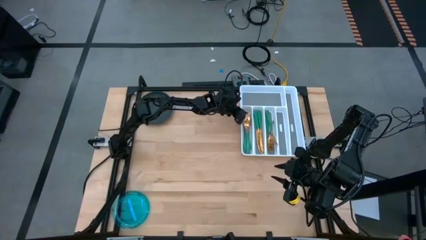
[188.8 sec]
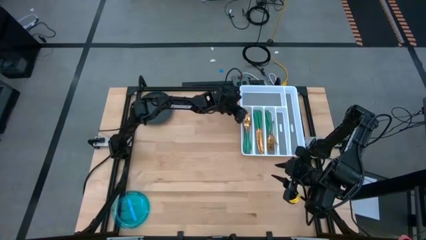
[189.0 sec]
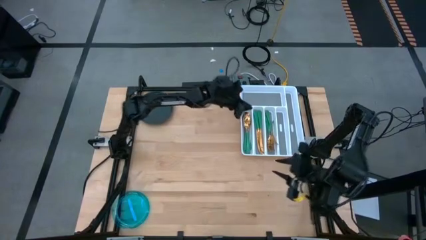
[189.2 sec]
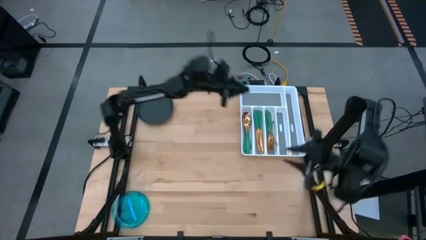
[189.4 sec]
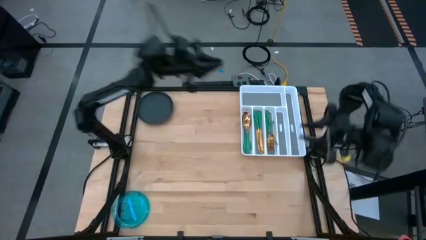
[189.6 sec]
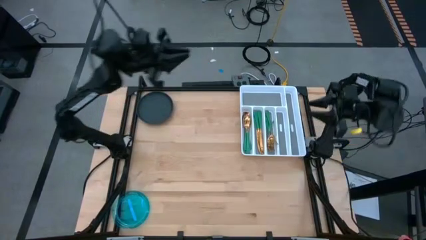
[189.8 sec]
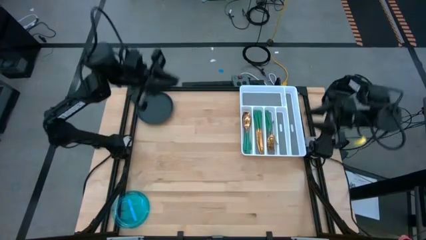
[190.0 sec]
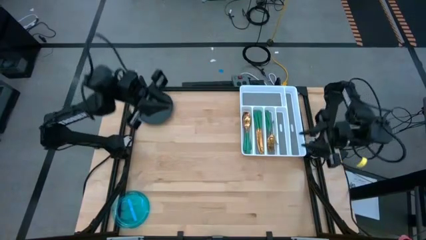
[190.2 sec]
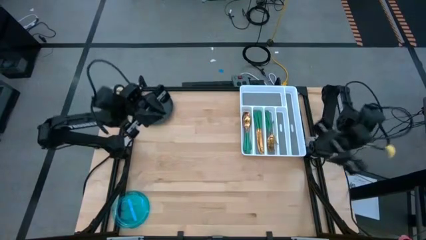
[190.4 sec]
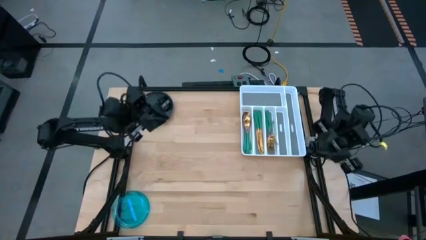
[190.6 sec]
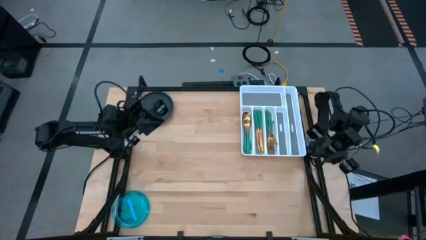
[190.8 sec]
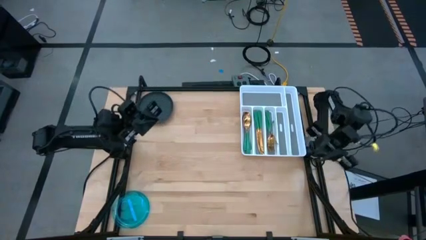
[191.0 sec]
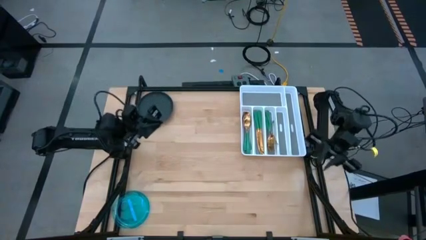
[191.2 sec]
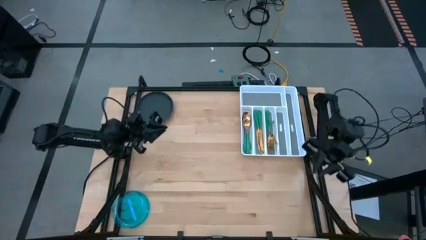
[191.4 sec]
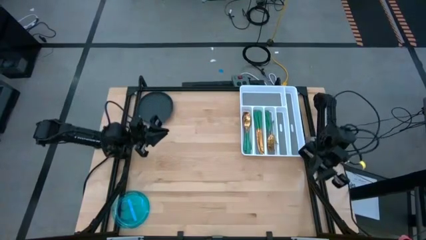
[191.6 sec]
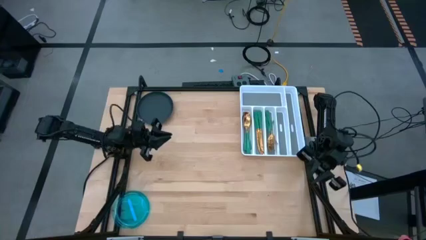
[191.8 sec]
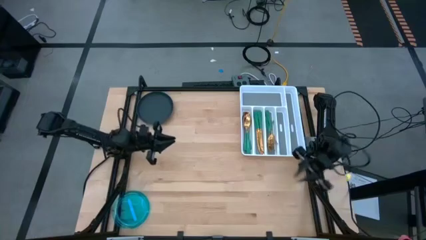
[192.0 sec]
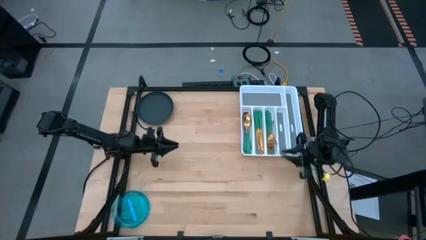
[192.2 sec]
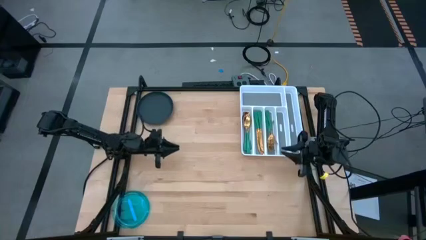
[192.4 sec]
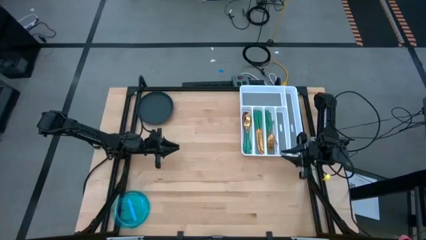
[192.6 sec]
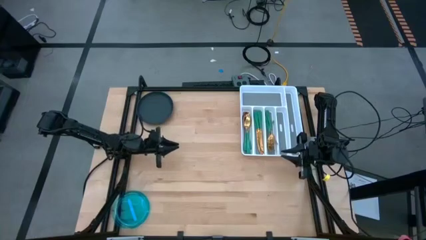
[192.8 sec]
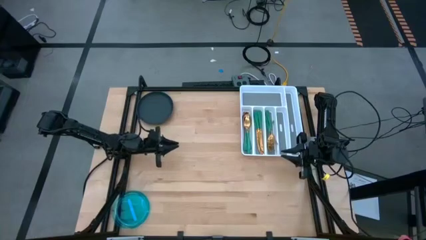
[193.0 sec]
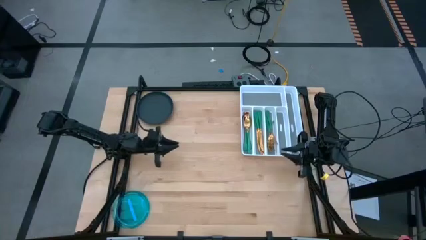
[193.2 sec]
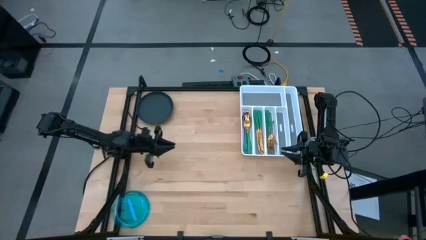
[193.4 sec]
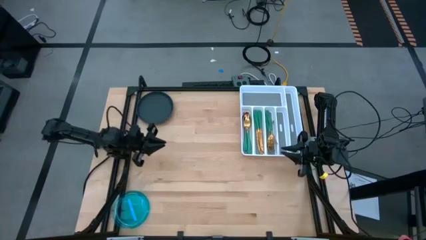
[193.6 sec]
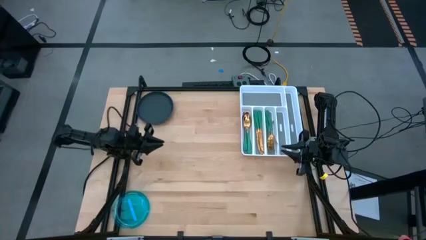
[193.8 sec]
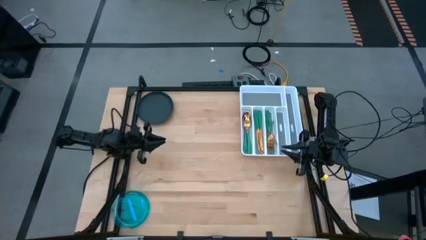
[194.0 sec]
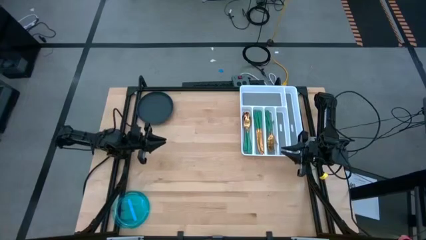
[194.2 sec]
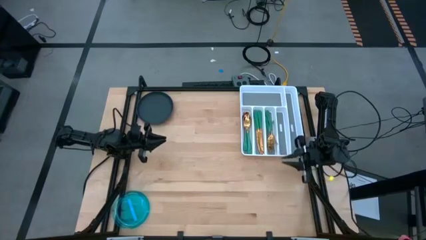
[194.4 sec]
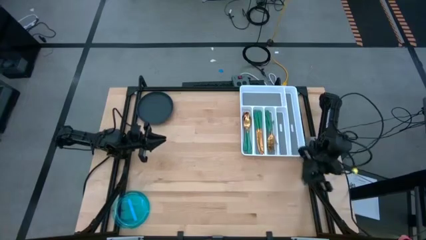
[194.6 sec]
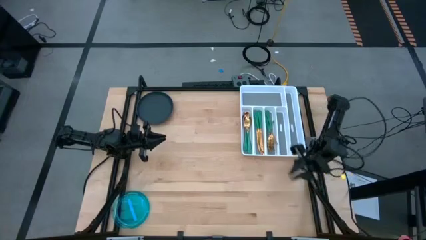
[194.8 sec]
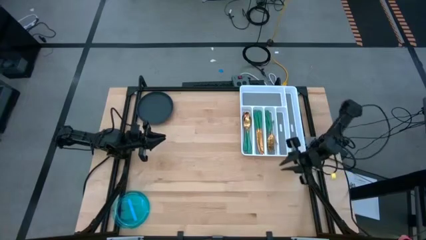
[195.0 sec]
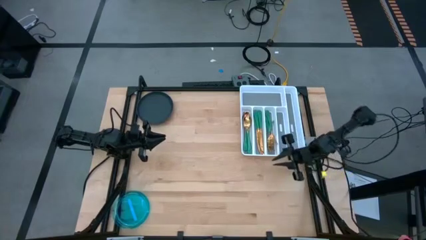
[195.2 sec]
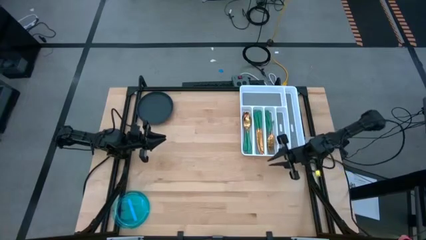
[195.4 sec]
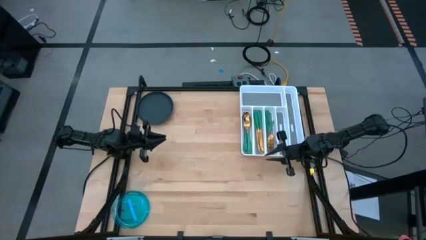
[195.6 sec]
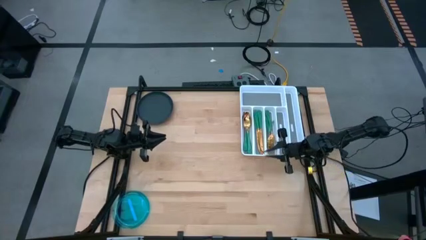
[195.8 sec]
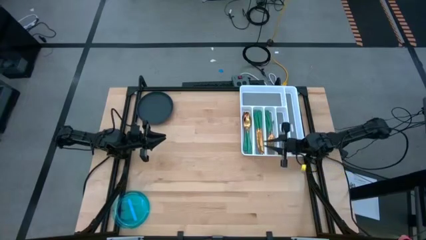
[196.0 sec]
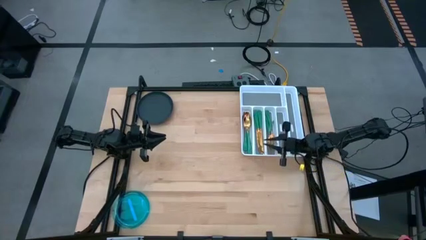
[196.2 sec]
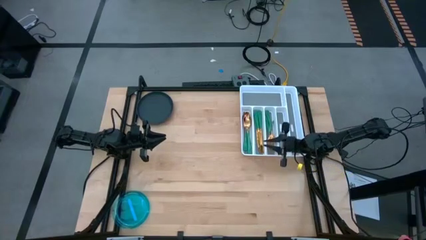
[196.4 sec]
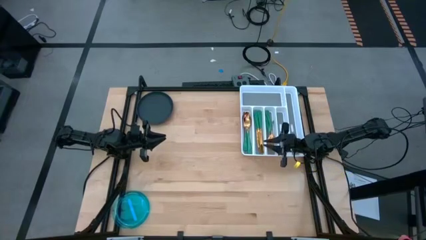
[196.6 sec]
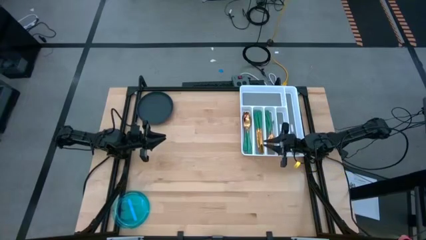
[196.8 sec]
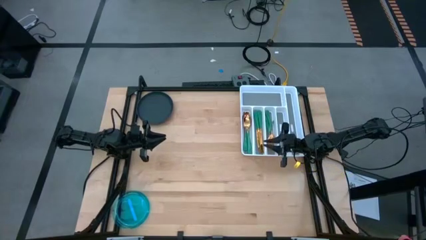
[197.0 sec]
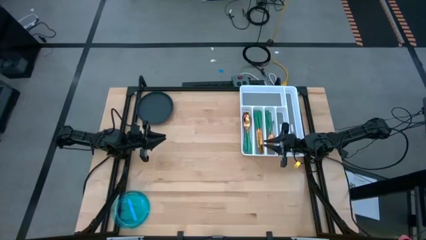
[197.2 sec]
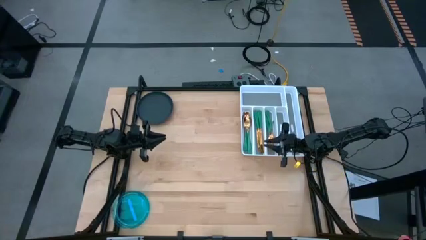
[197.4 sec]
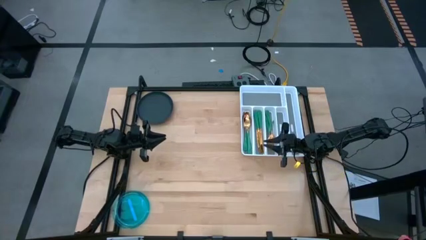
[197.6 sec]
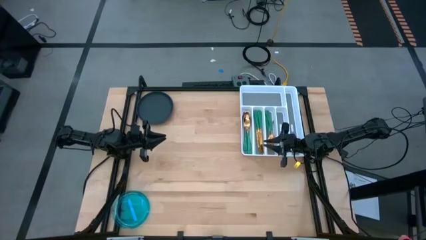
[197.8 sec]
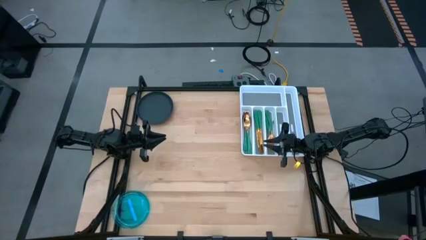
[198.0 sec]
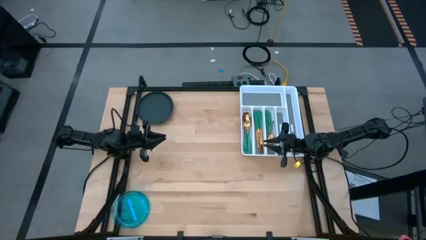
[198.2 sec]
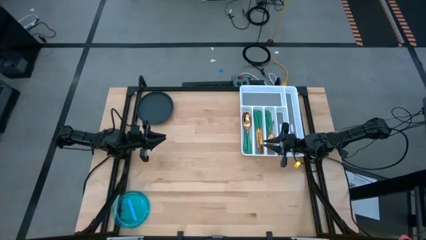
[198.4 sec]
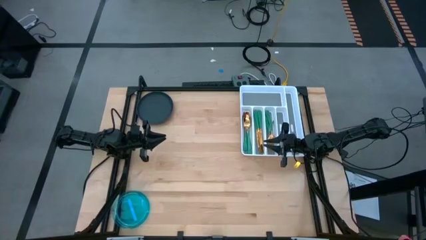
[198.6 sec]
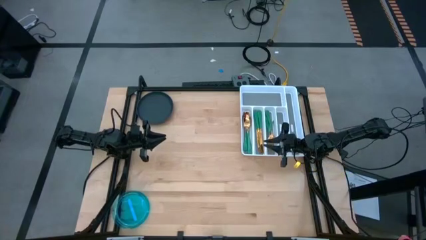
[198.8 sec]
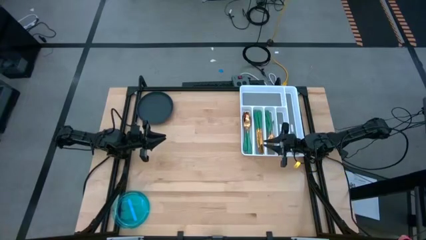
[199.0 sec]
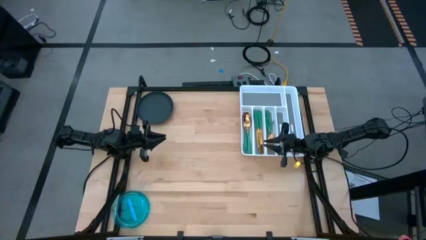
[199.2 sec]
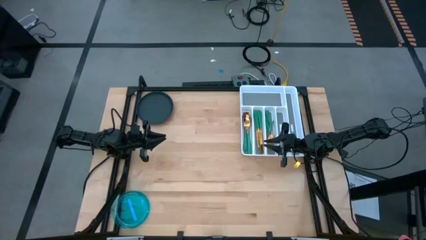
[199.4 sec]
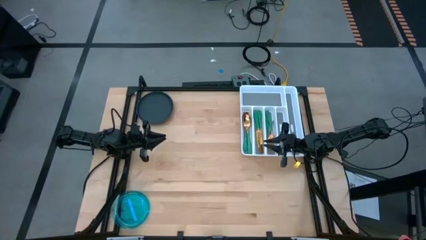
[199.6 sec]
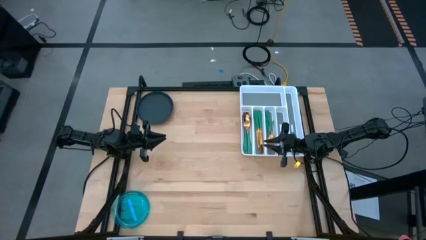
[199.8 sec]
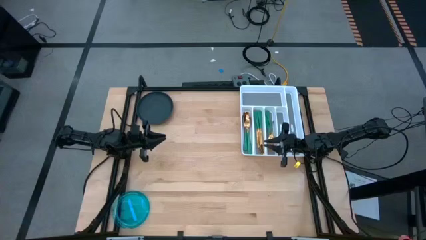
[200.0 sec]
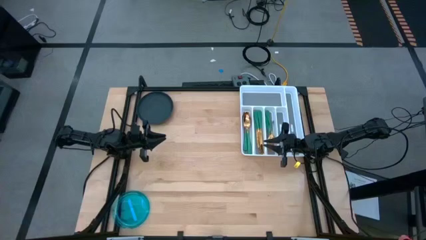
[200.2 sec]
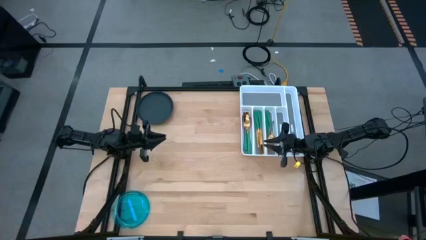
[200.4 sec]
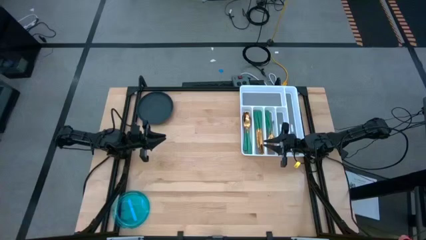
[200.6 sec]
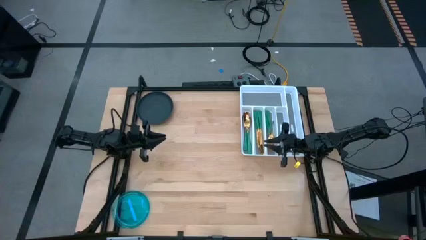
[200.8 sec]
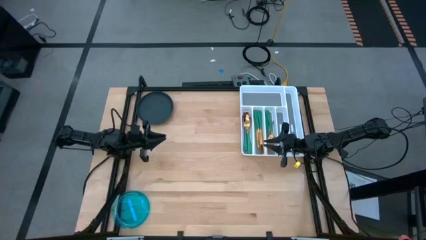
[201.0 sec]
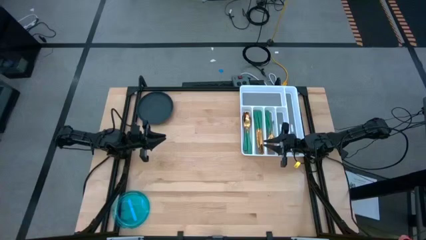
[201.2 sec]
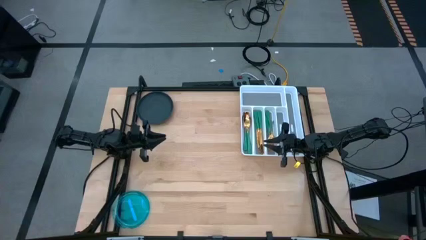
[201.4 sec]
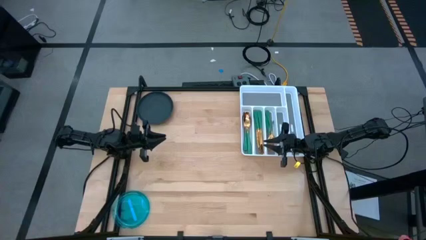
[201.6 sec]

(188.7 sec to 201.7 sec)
Task: Sort silverware
Return to Home Position
